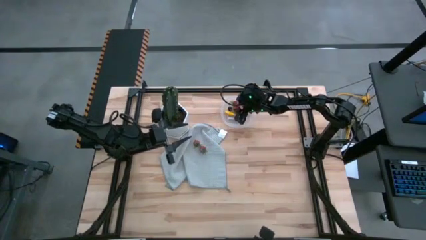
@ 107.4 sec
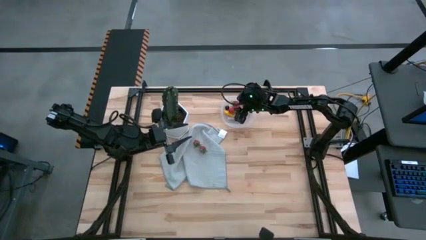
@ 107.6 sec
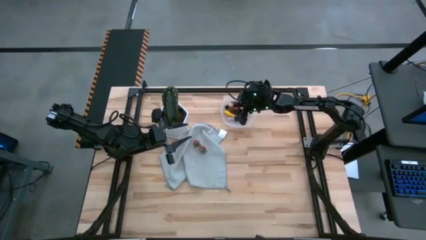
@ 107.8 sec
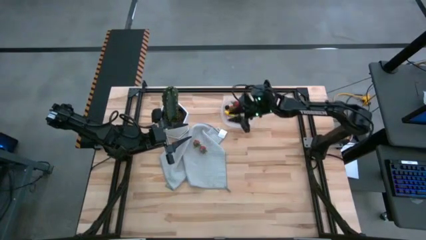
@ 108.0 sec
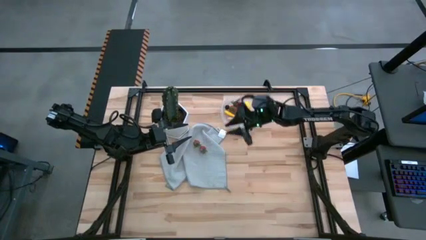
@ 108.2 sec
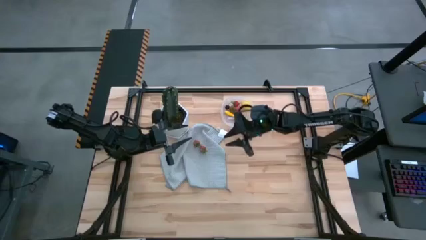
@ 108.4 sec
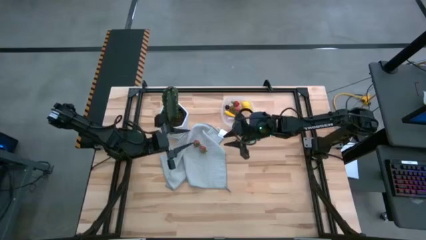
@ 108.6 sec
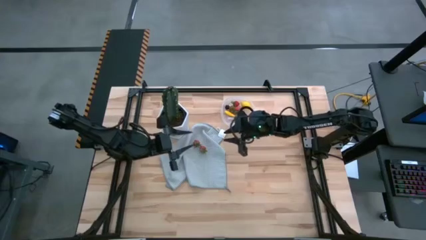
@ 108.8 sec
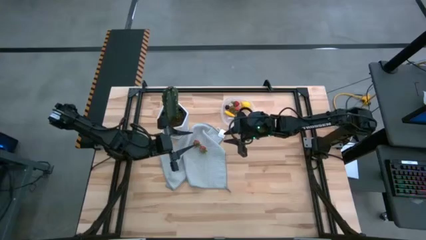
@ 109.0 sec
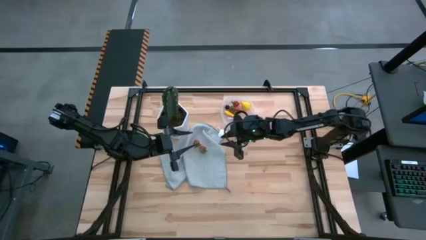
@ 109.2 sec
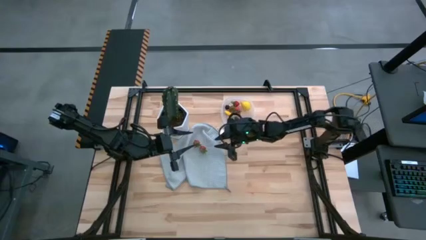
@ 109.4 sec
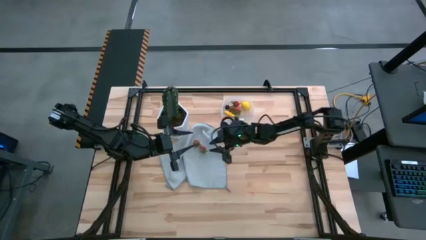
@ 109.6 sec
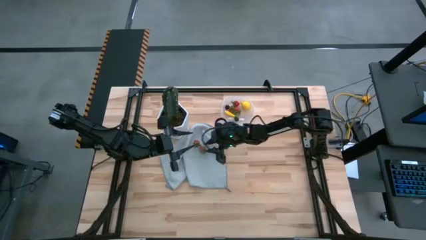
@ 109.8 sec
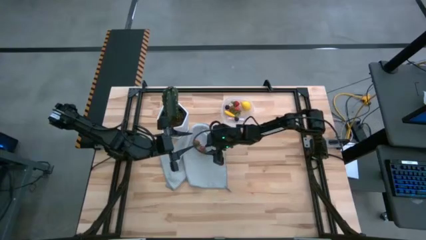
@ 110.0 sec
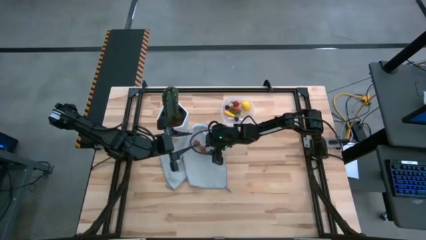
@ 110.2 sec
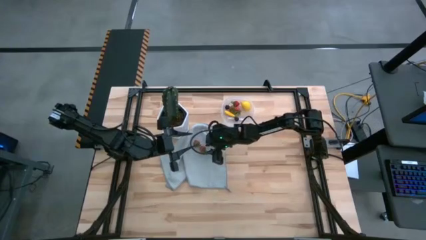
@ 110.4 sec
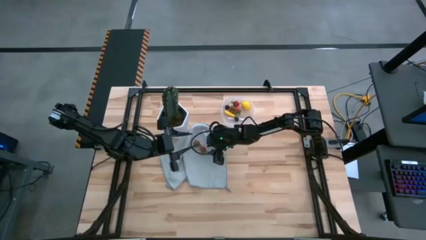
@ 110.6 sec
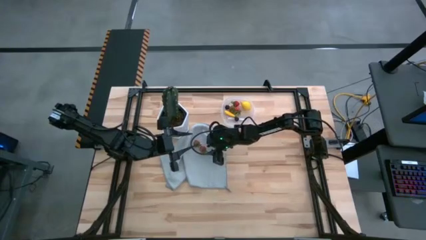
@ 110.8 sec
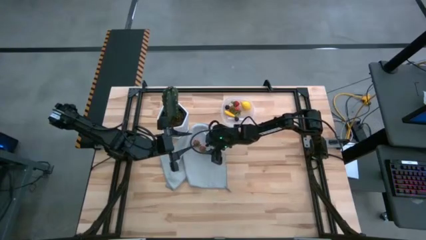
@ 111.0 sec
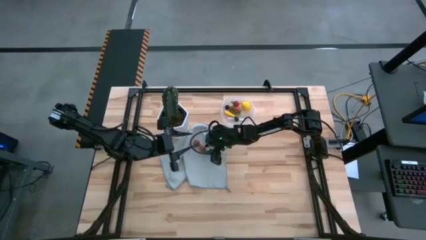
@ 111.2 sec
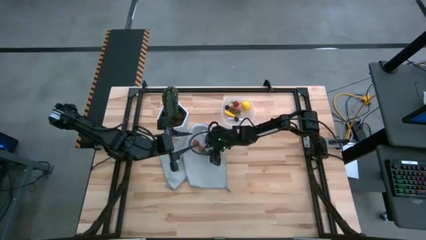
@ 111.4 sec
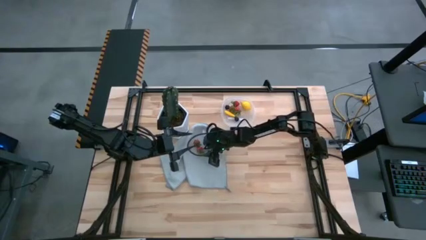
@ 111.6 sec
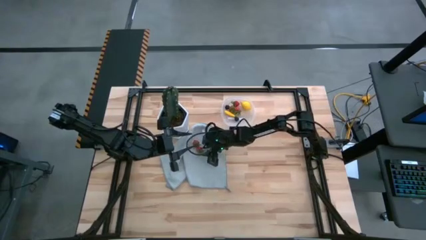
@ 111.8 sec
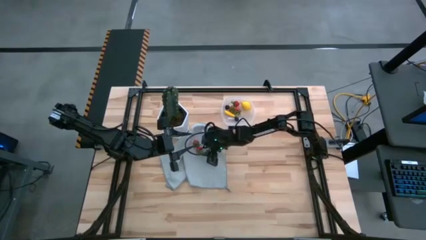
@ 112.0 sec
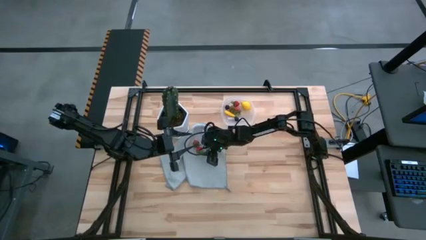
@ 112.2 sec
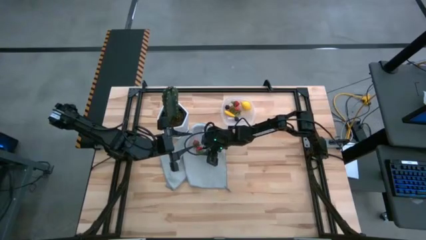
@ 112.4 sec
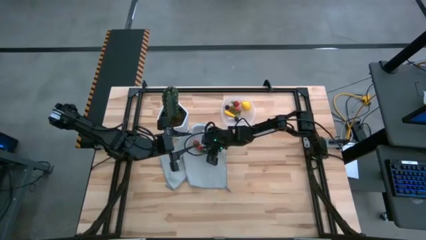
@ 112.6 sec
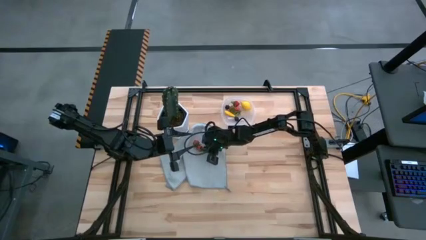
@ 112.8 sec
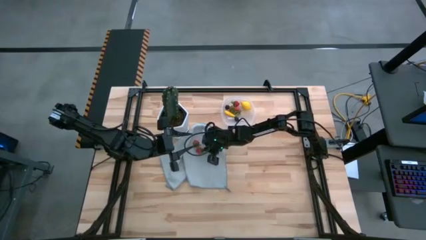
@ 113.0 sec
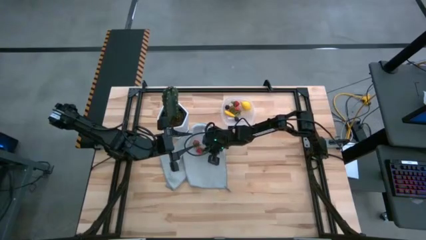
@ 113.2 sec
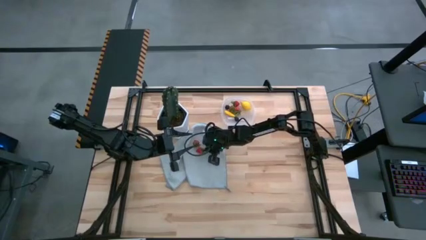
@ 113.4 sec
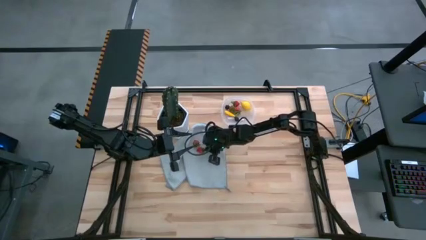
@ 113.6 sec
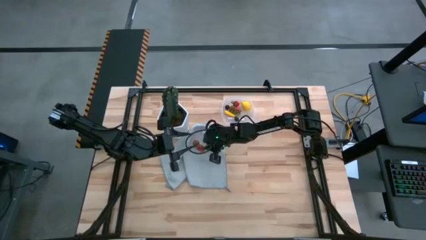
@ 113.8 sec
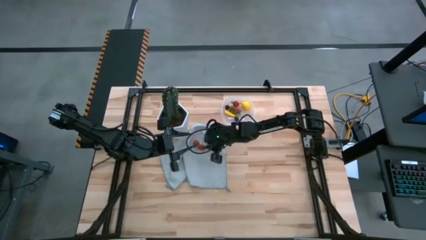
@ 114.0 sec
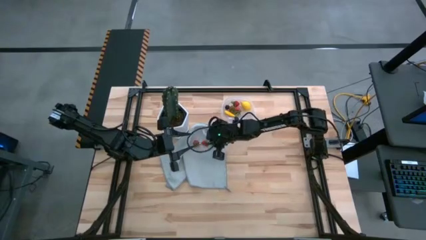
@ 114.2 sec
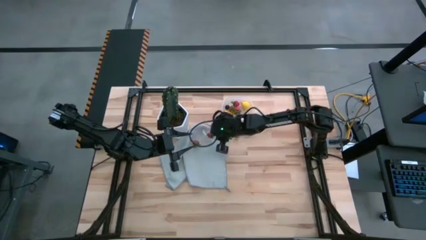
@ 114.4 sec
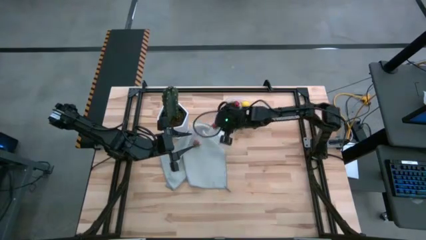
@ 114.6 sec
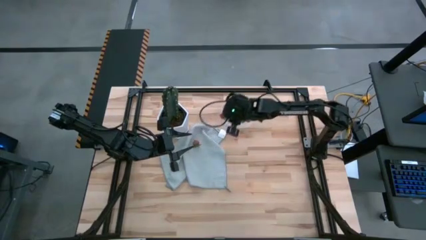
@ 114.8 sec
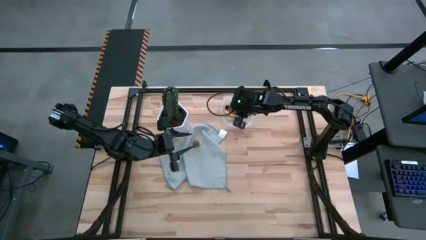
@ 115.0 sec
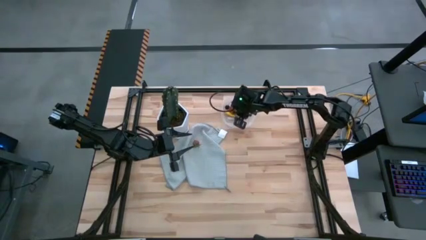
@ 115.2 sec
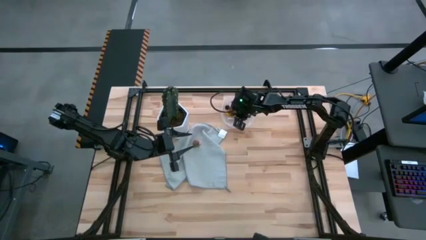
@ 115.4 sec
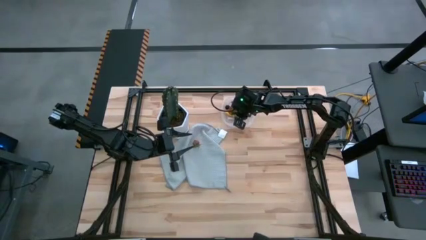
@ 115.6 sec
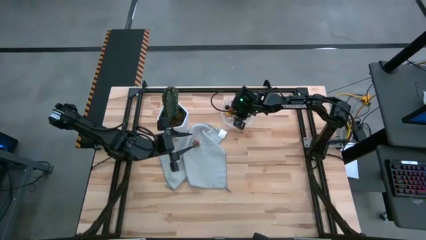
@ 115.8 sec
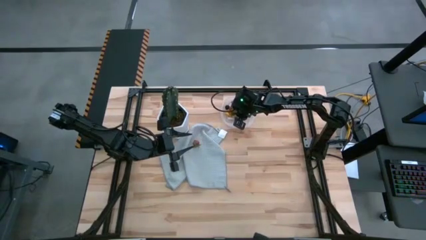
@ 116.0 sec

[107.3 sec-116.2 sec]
Task: Pick and placing Produce into tupperware
Put the red strawberry into the transparent bin

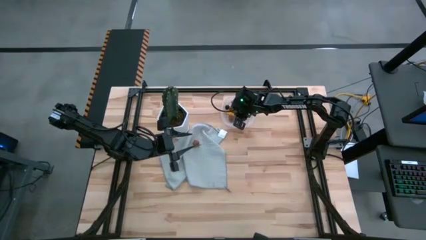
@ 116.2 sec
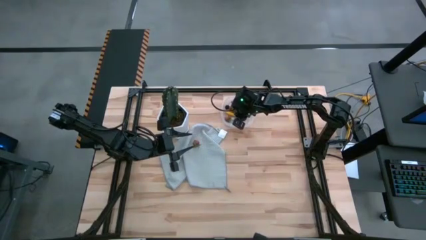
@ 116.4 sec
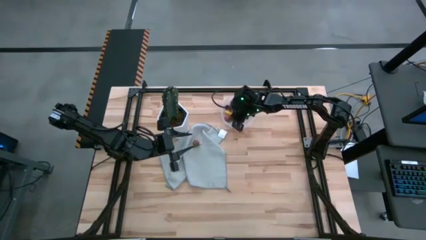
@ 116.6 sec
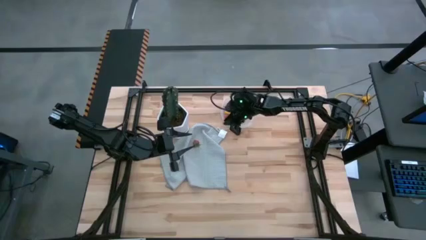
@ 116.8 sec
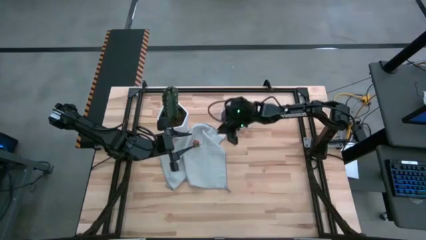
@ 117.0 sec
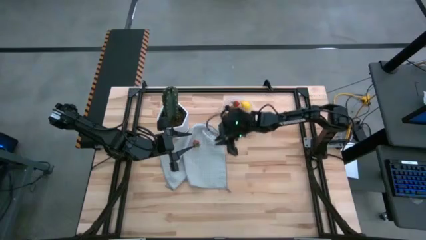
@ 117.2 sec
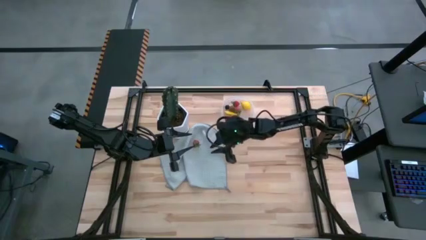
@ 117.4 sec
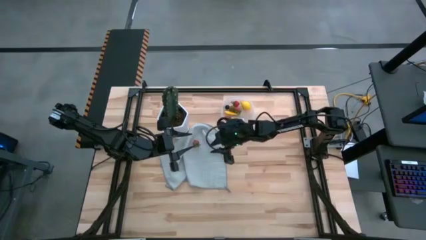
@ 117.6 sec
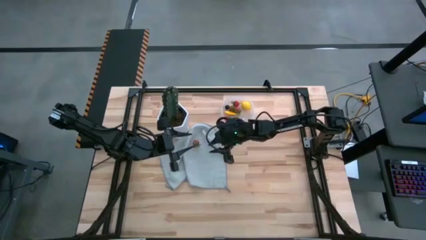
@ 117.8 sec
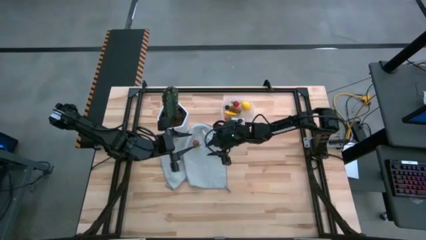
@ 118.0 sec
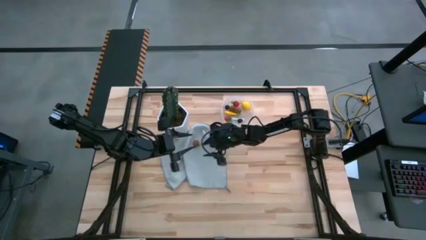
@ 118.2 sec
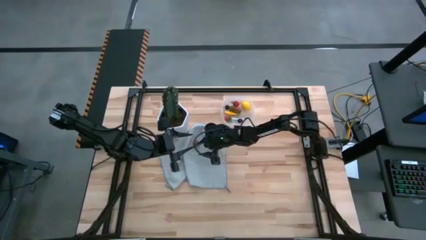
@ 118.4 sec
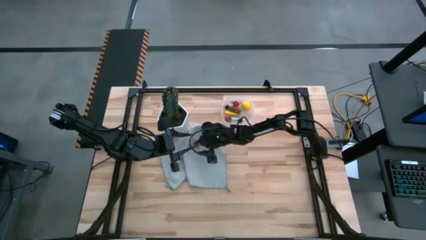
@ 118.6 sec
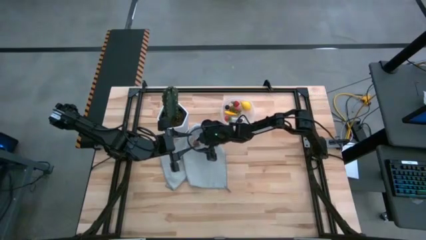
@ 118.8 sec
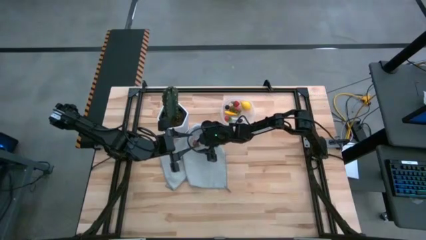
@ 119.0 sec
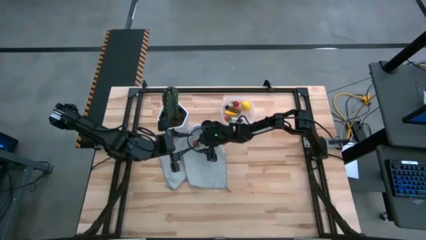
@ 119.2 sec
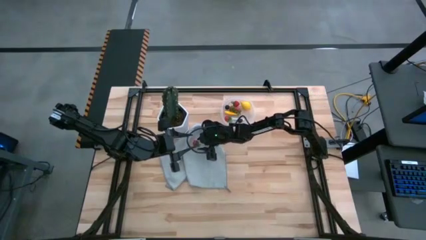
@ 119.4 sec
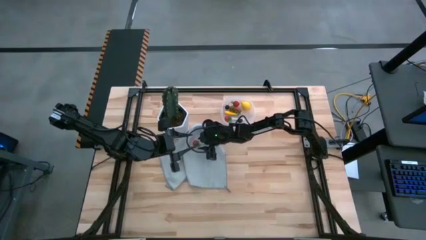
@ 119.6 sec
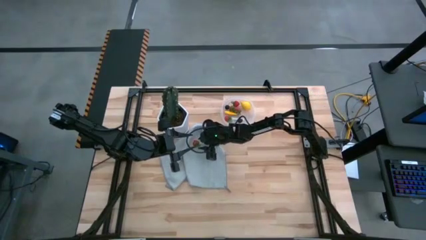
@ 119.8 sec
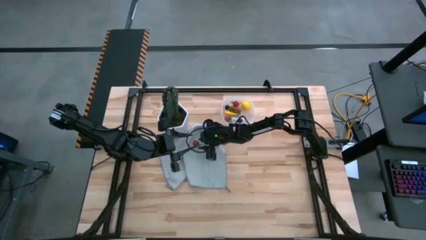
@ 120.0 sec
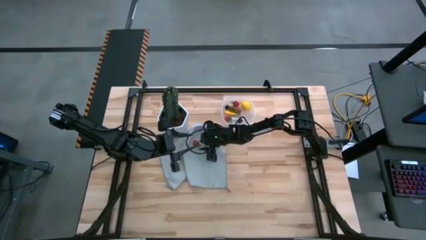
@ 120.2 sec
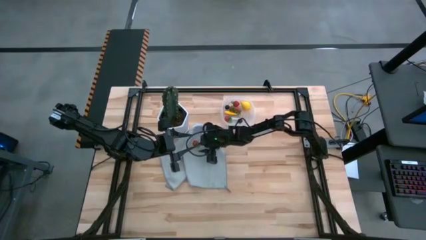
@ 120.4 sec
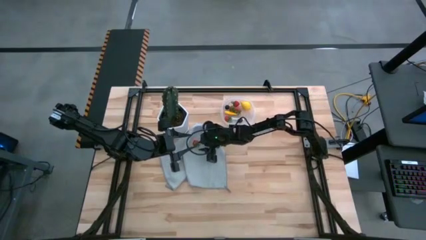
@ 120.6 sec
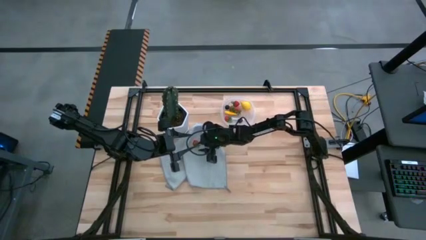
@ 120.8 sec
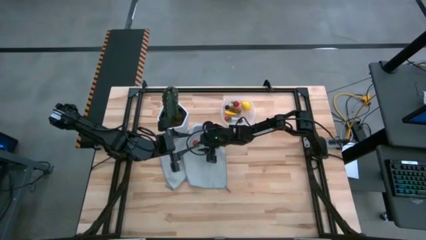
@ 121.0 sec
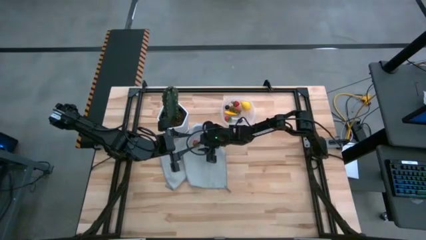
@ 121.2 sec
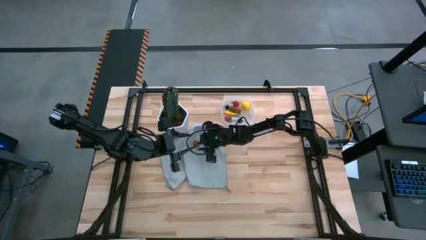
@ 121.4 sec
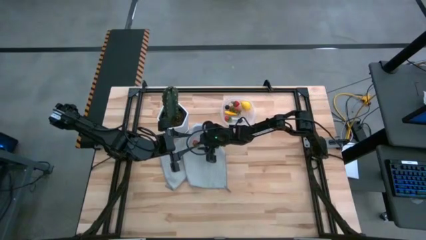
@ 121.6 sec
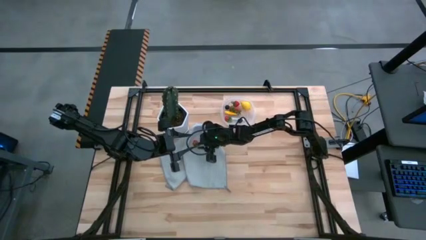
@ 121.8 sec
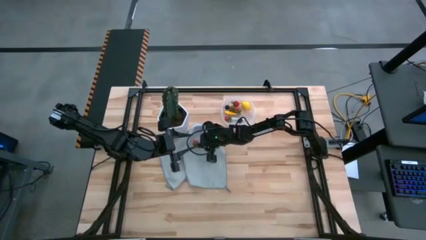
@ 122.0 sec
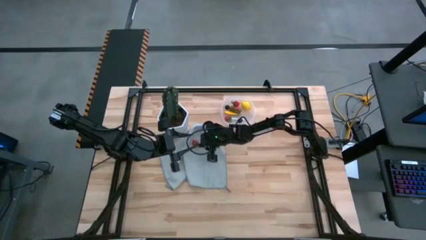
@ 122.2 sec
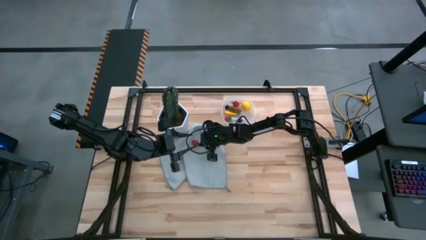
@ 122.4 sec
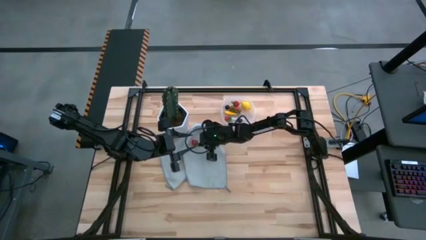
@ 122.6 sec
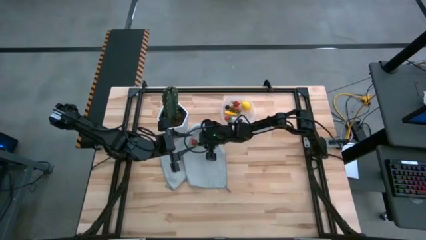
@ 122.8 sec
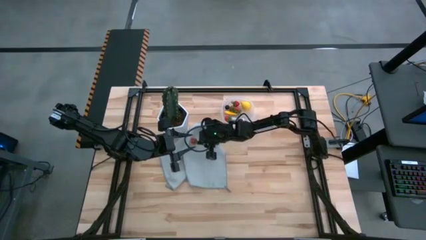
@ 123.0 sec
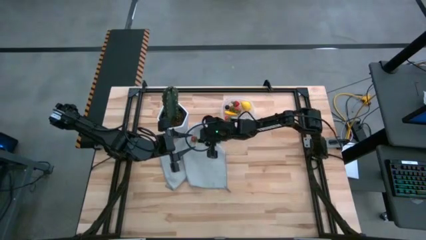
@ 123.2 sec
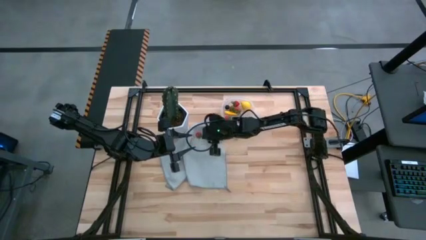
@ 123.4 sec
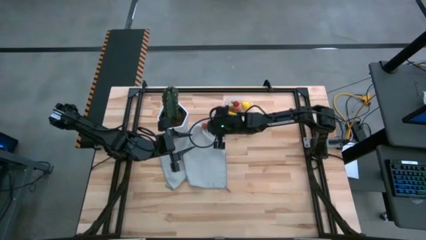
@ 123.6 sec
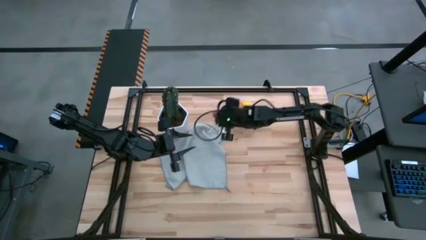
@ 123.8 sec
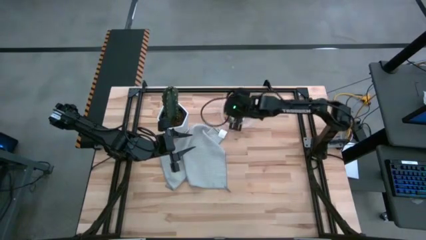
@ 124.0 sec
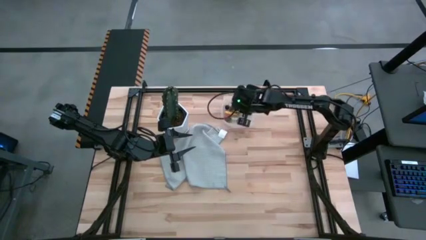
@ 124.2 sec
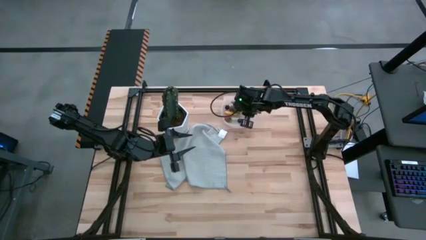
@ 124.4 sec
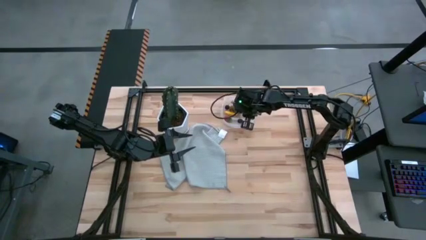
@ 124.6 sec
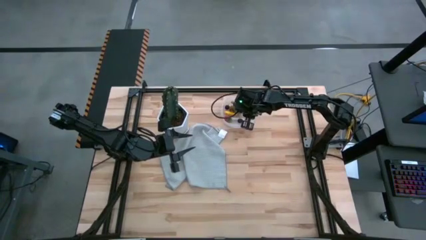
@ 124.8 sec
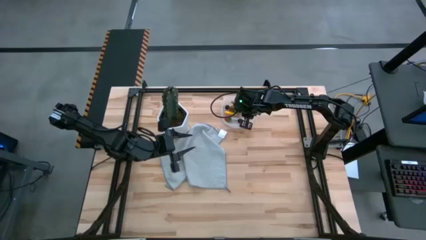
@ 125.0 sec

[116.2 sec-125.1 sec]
Put the red strawberry into the transparent bin
